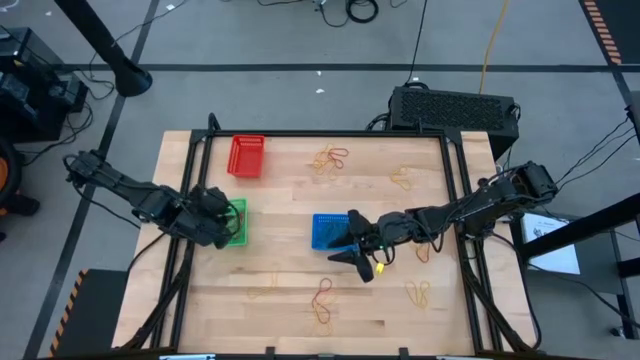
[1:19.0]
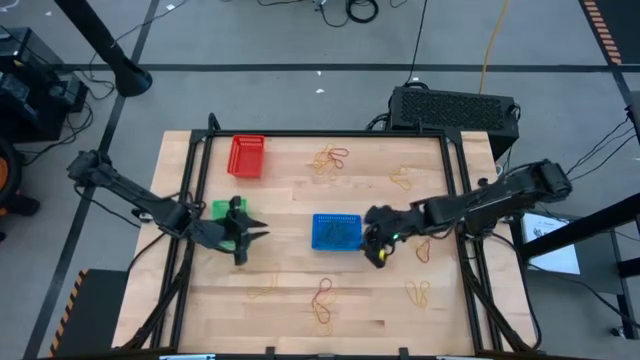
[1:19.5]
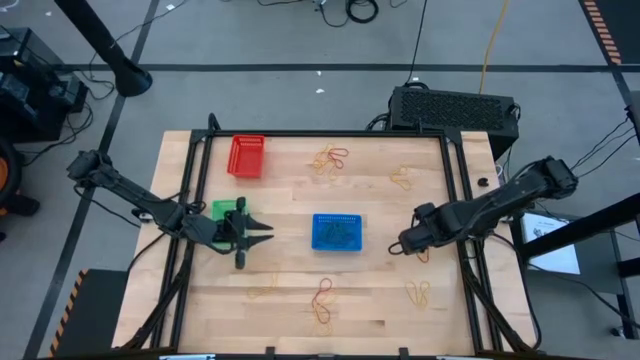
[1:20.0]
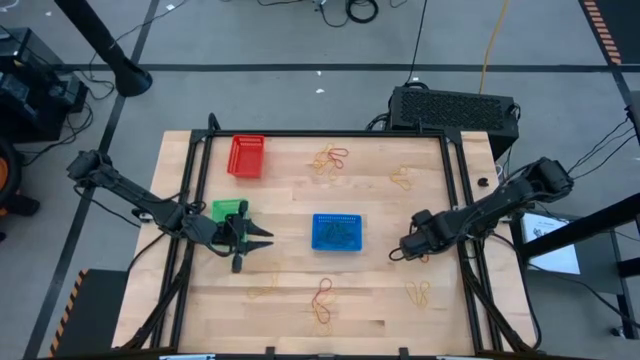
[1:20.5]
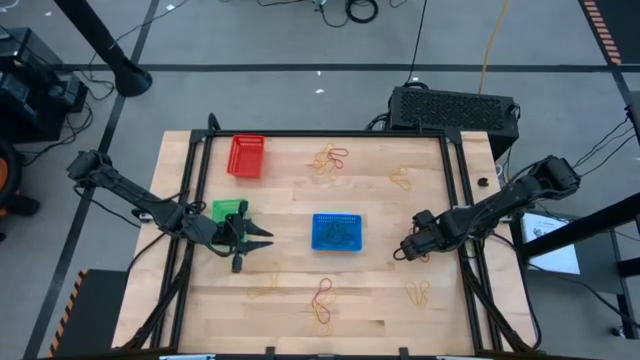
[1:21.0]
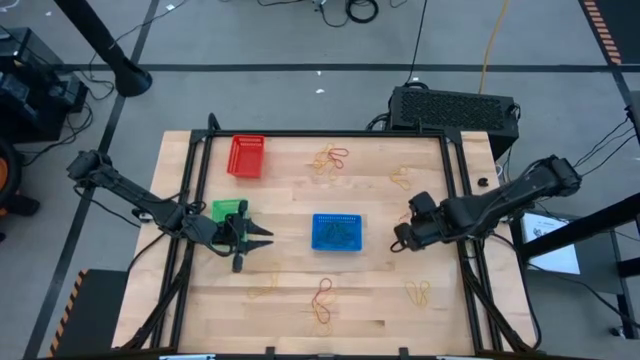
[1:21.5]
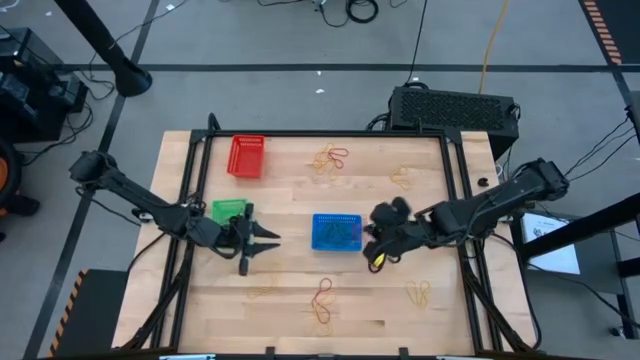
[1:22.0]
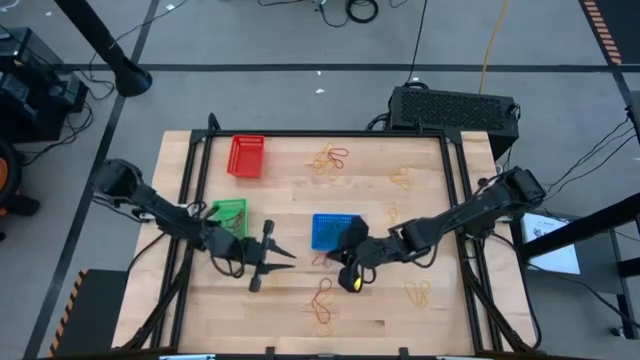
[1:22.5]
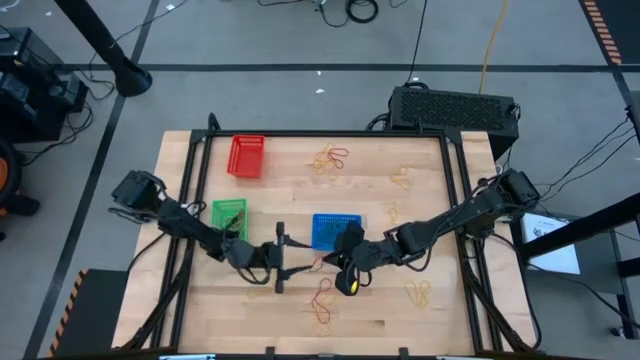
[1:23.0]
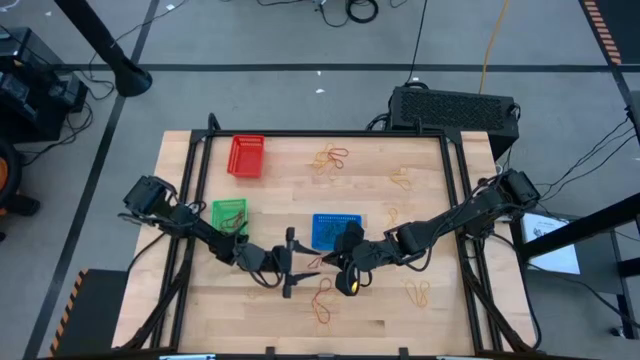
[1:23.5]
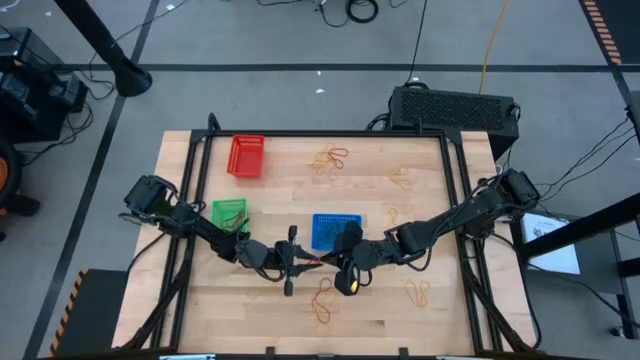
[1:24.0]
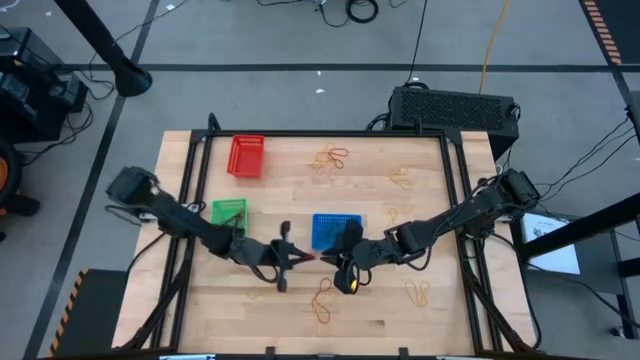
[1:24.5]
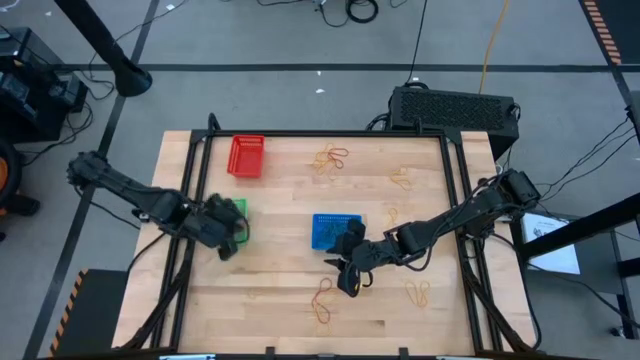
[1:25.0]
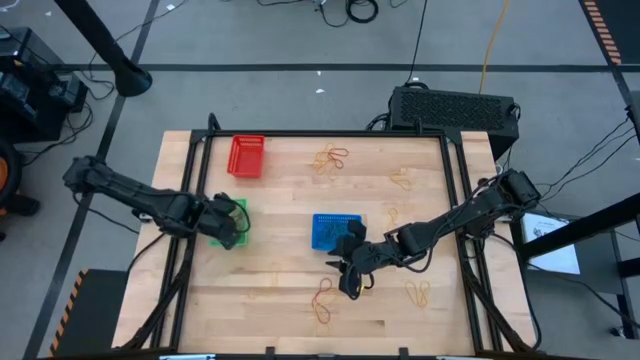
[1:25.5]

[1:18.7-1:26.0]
Task: Sort rubber bands into baskets
Put the red rubber band into the green bin

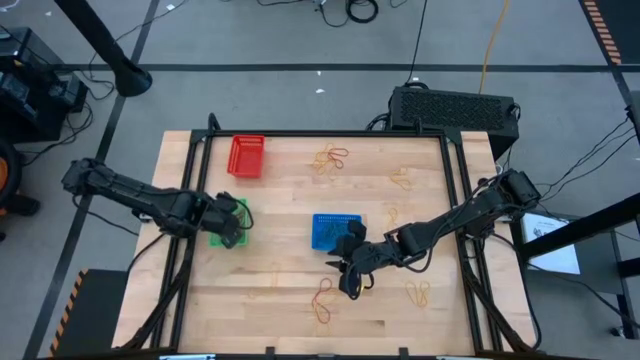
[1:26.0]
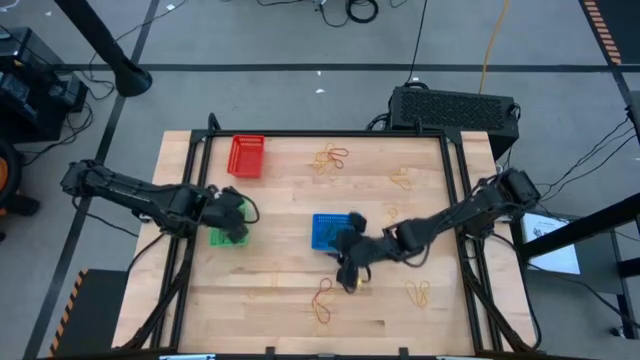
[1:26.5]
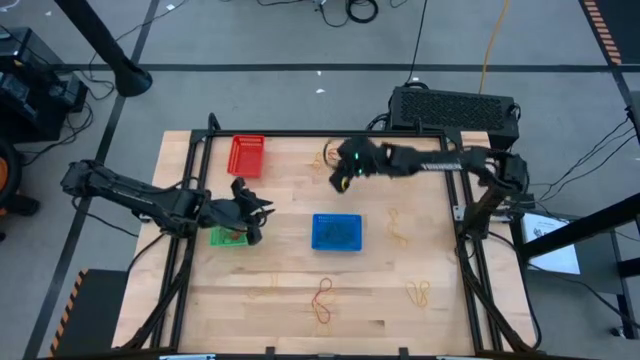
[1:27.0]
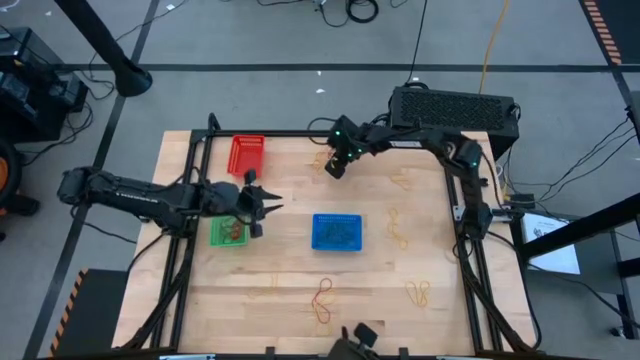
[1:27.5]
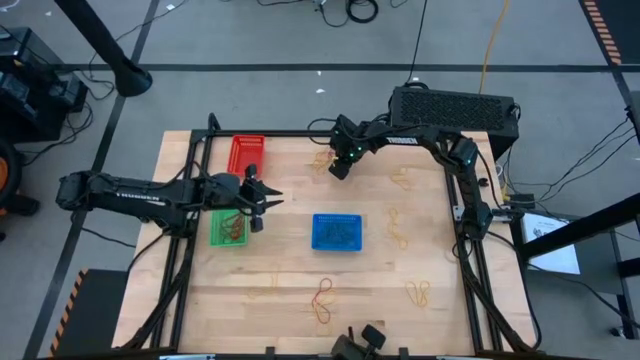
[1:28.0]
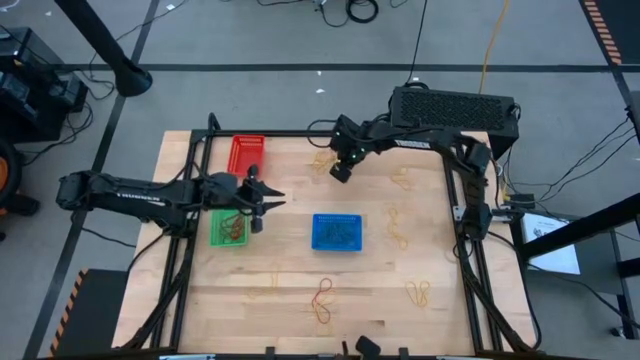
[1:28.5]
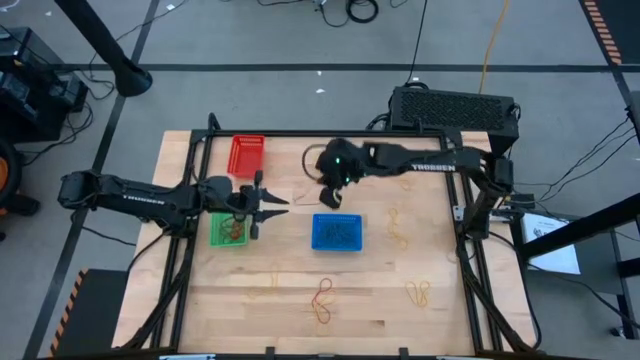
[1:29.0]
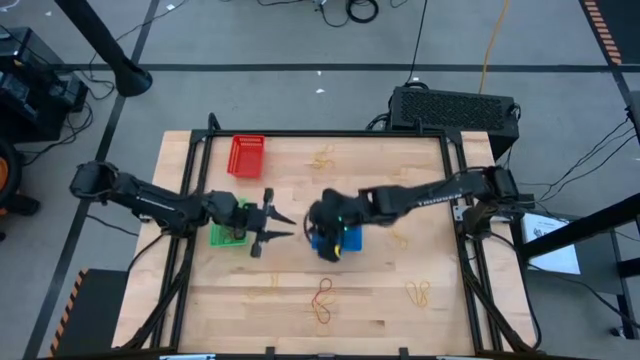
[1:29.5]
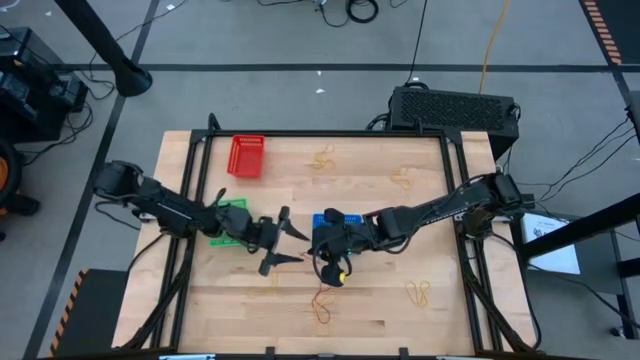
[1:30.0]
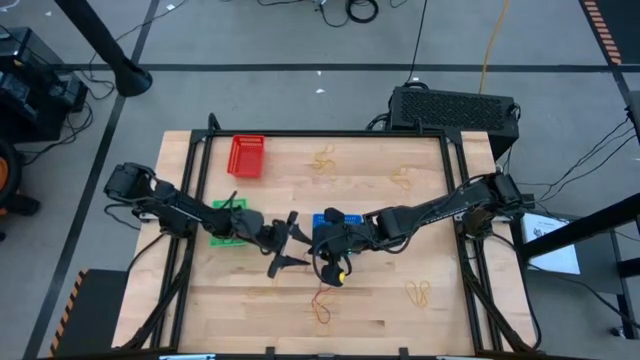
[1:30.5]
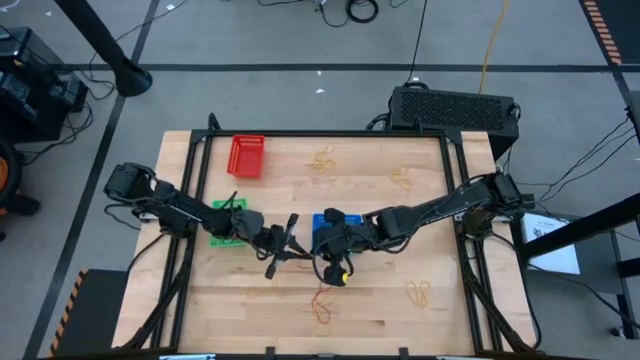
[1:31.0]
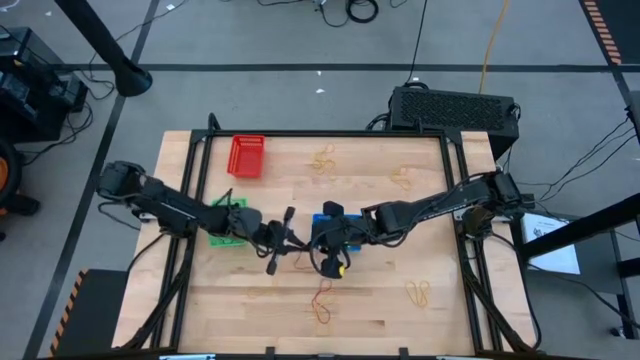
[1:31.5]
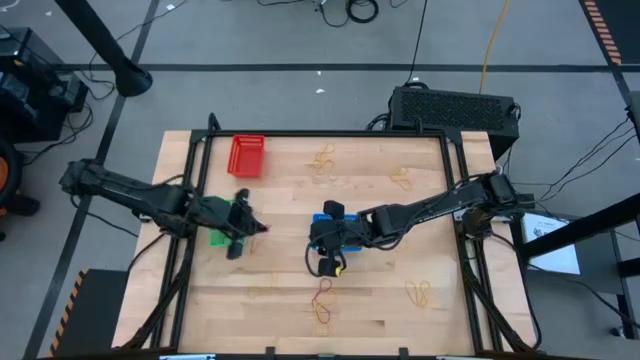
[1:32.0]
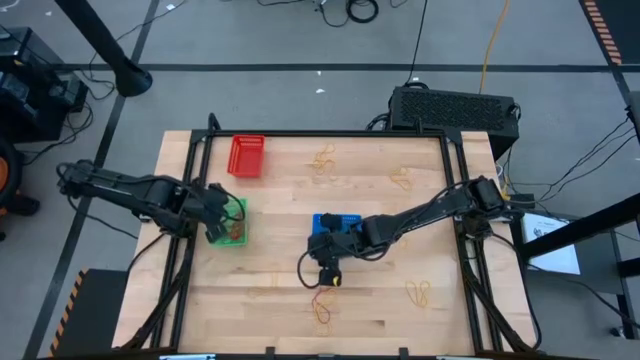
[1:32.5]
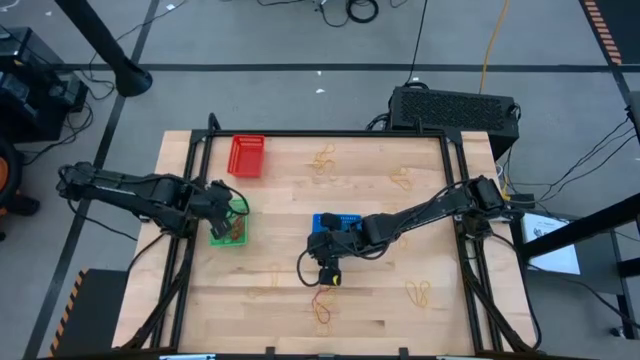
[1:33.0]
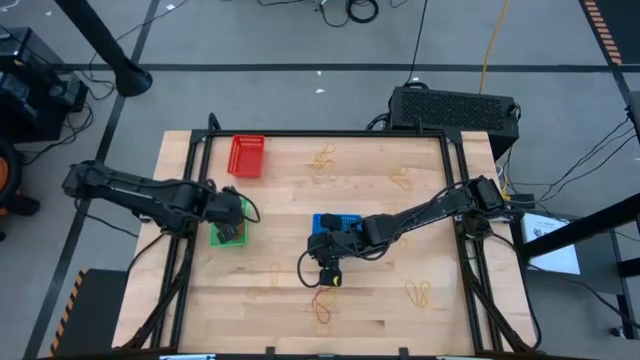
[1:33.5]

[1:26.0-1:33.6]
Put the red rubber band into the green bin

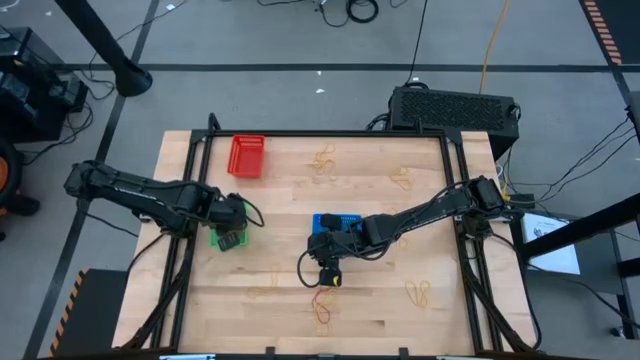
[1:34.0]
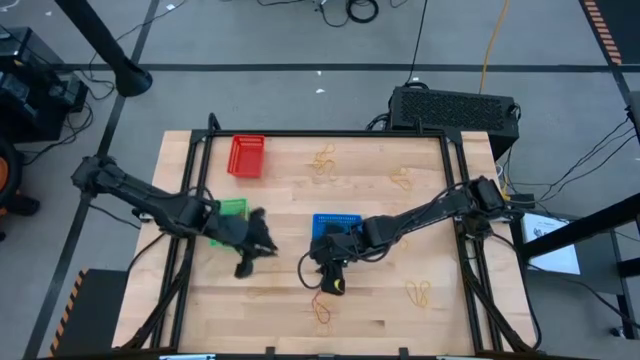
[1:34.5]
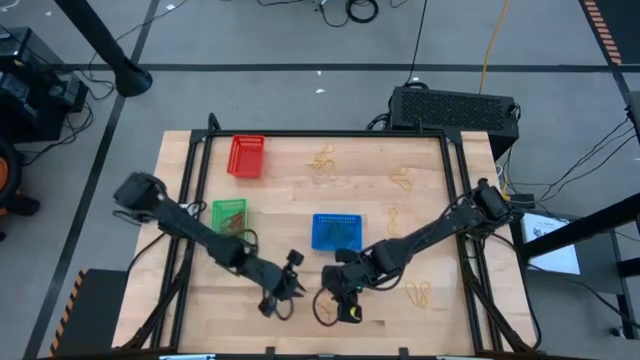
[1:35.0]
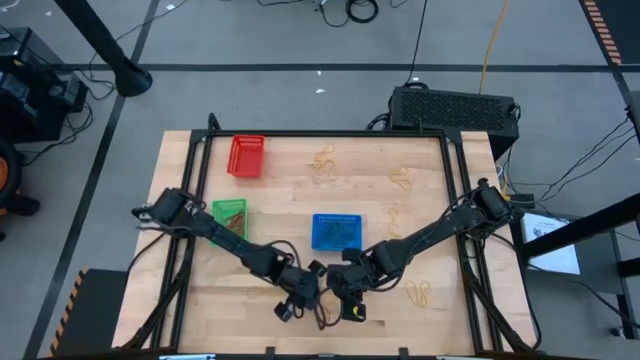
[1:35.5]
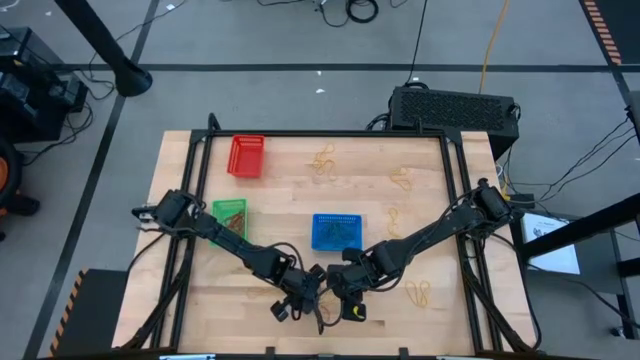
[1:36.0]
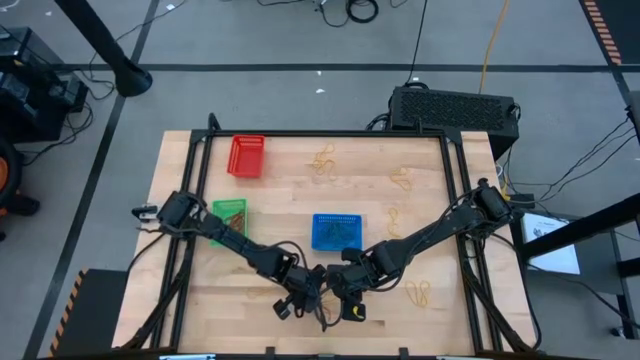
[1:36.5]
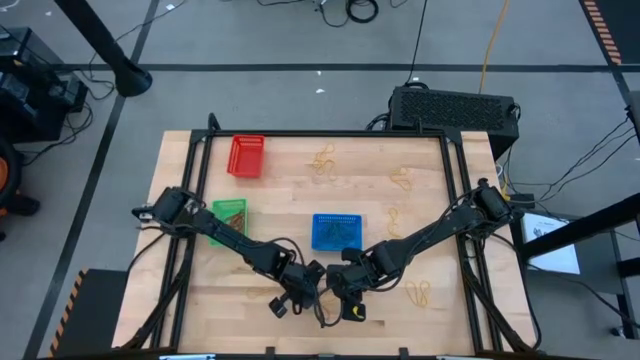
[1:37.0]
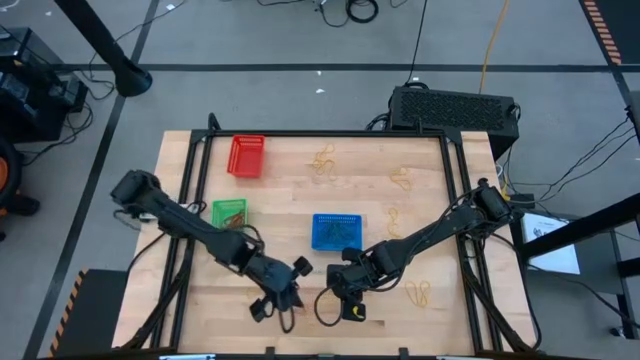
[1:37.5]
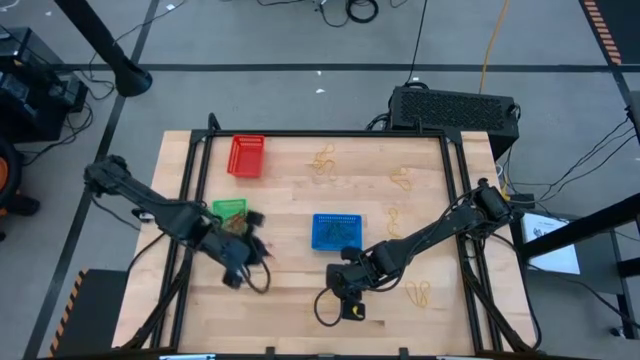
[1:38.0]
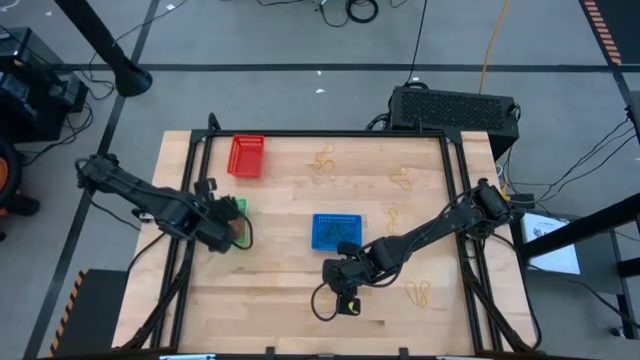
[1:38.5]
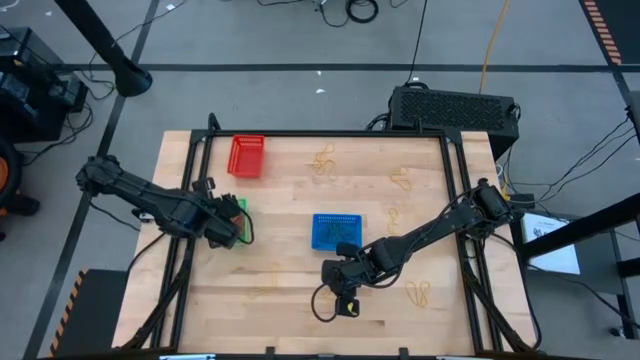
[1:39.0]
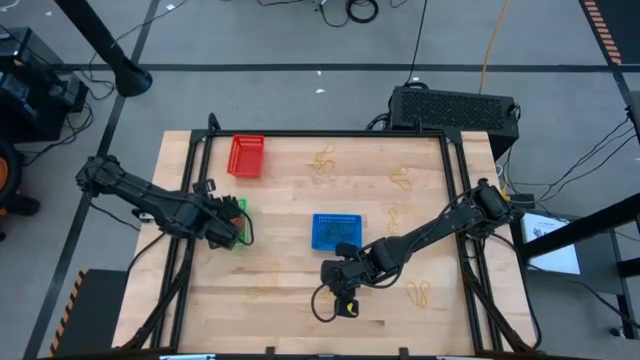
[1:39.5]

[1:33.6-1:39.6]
Put the red rubber band into the green bin
